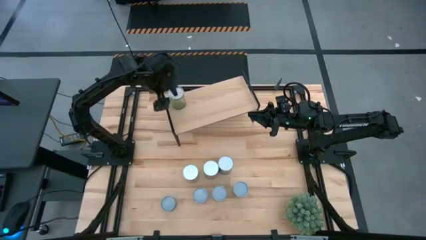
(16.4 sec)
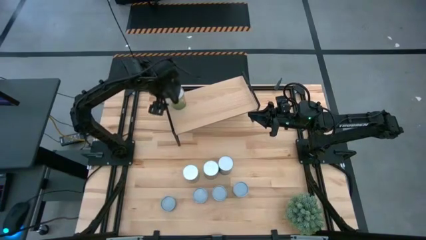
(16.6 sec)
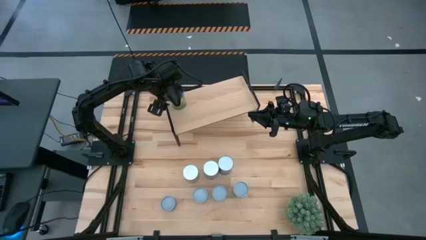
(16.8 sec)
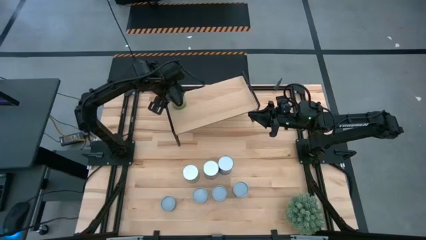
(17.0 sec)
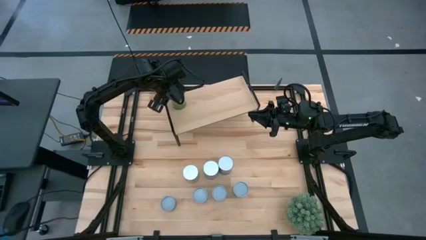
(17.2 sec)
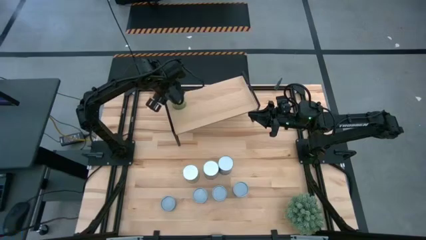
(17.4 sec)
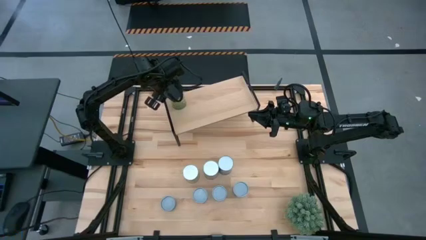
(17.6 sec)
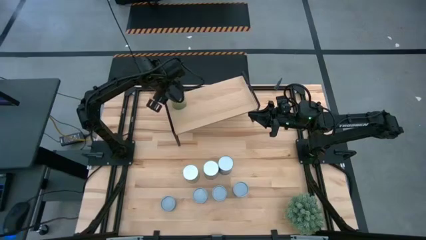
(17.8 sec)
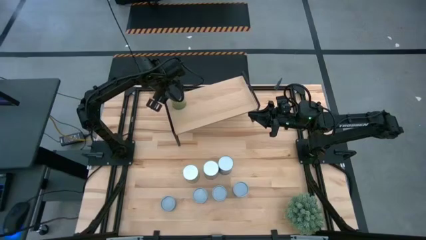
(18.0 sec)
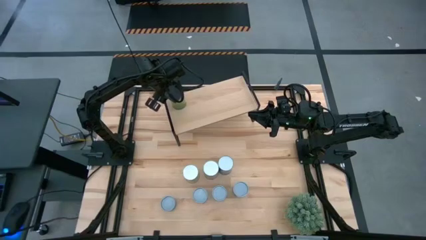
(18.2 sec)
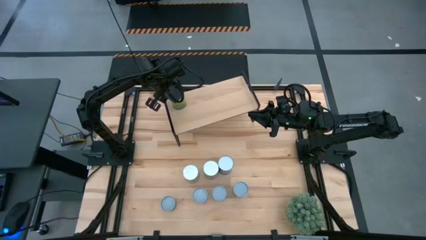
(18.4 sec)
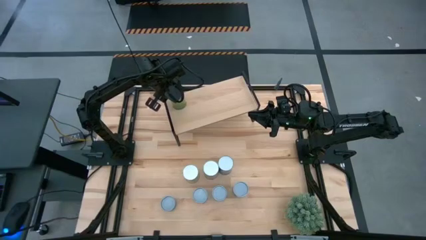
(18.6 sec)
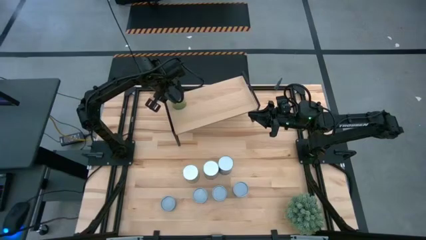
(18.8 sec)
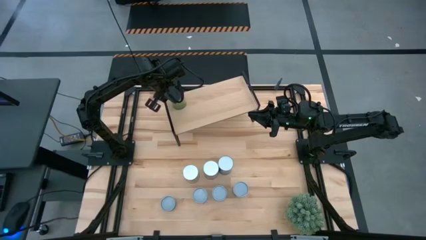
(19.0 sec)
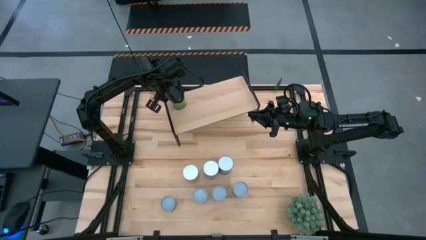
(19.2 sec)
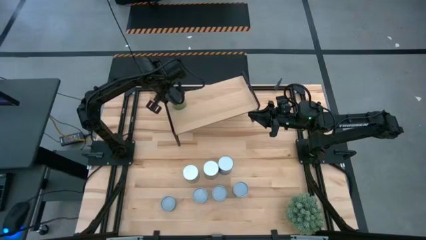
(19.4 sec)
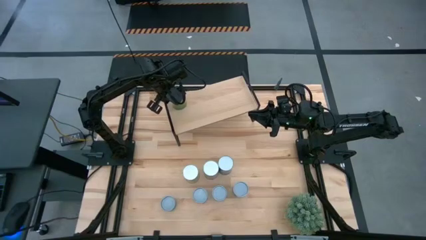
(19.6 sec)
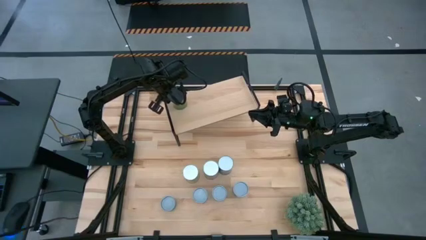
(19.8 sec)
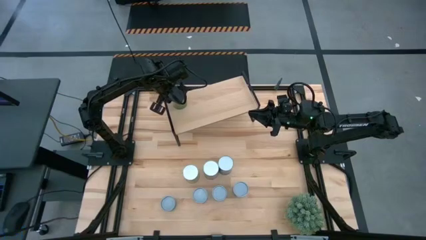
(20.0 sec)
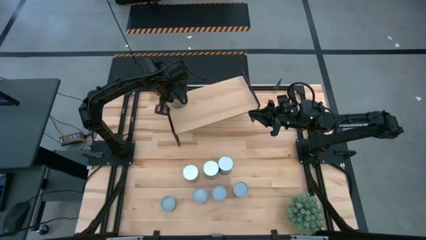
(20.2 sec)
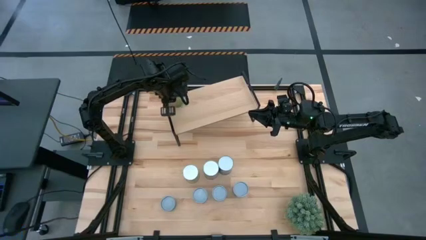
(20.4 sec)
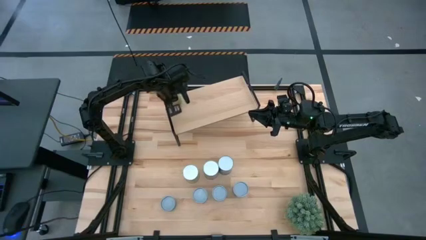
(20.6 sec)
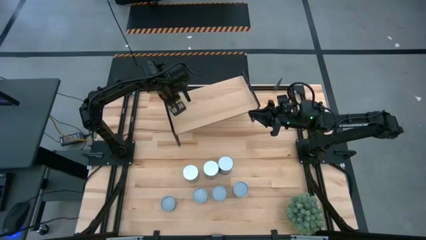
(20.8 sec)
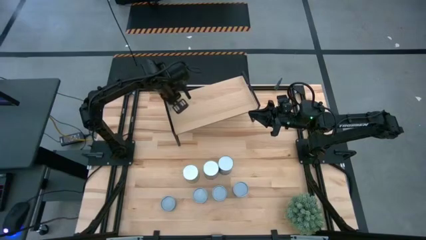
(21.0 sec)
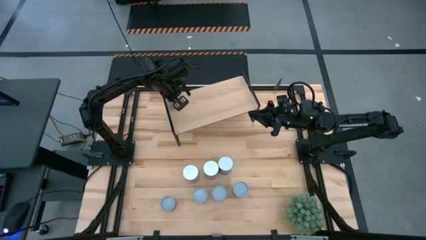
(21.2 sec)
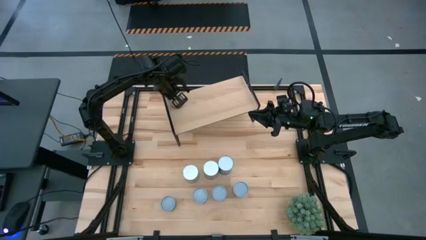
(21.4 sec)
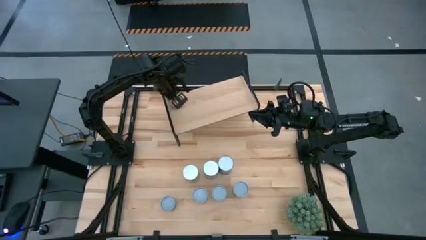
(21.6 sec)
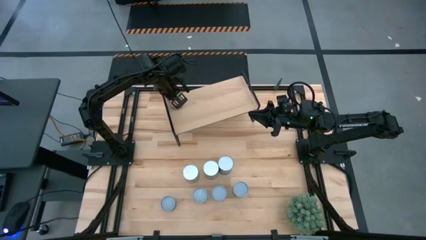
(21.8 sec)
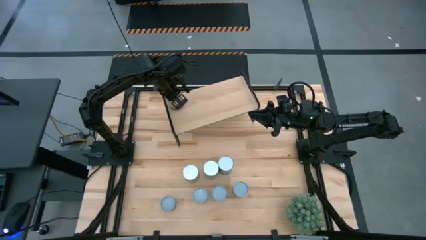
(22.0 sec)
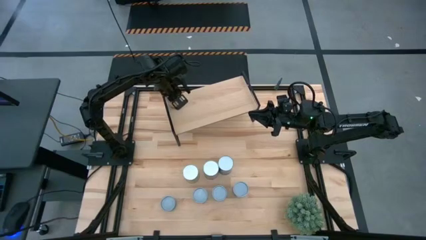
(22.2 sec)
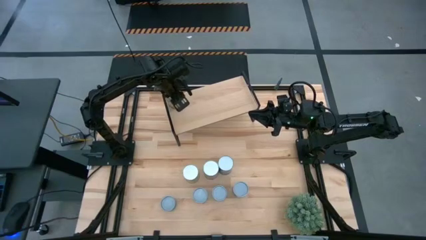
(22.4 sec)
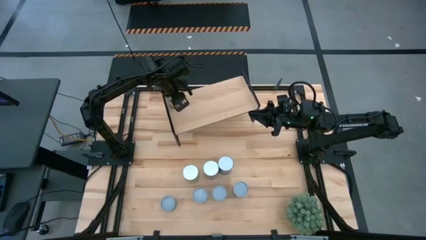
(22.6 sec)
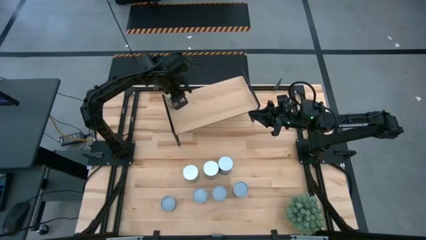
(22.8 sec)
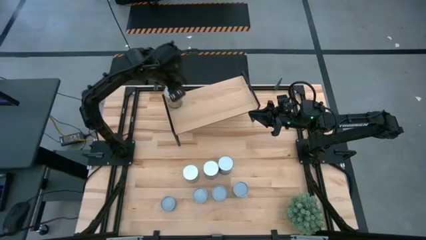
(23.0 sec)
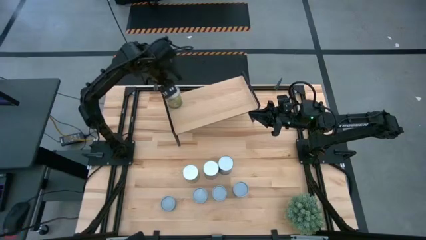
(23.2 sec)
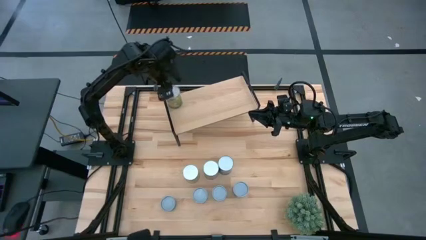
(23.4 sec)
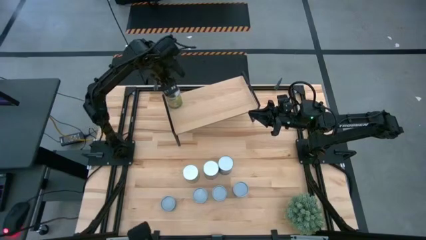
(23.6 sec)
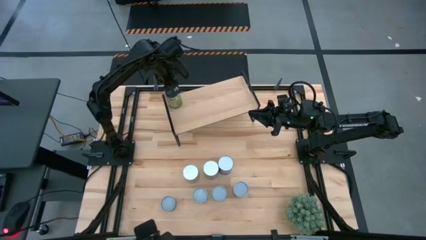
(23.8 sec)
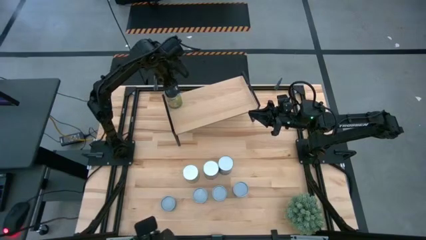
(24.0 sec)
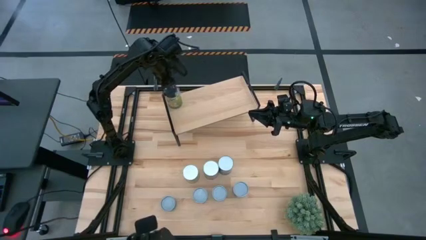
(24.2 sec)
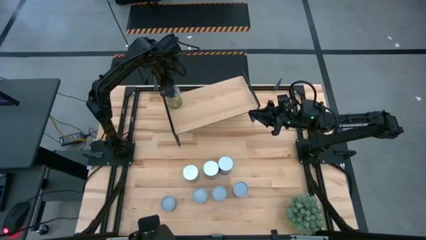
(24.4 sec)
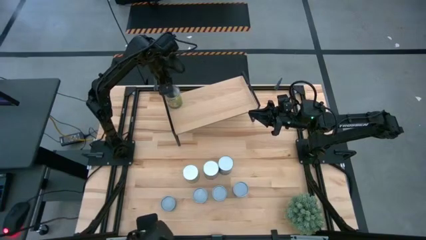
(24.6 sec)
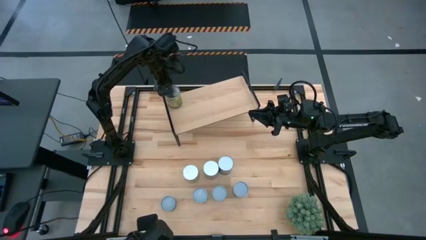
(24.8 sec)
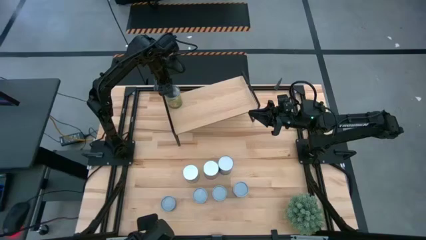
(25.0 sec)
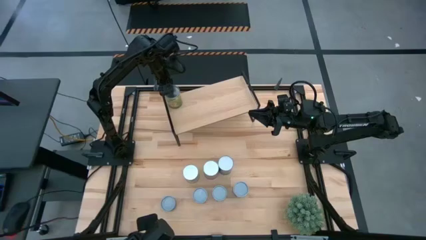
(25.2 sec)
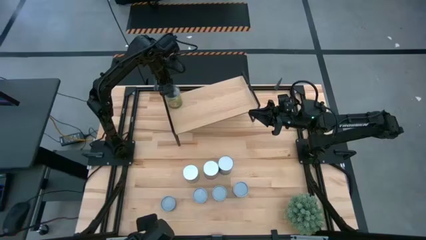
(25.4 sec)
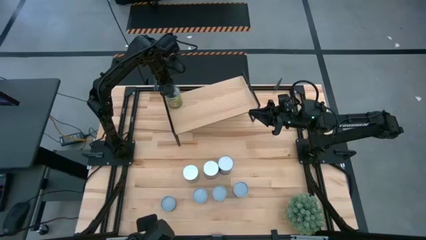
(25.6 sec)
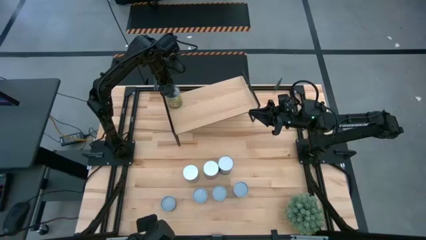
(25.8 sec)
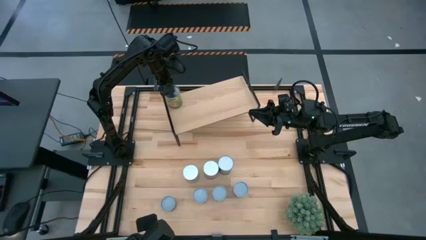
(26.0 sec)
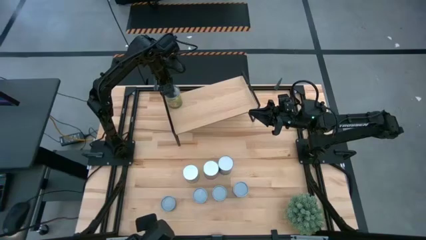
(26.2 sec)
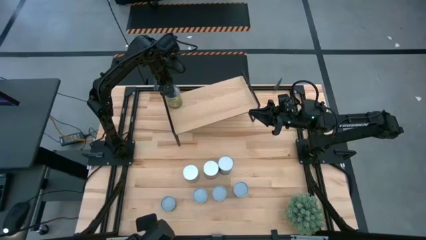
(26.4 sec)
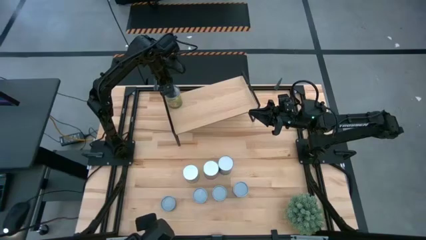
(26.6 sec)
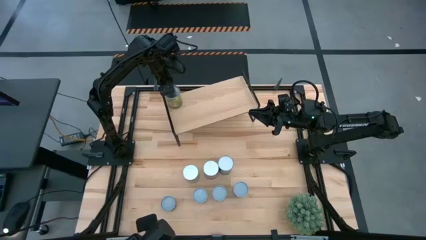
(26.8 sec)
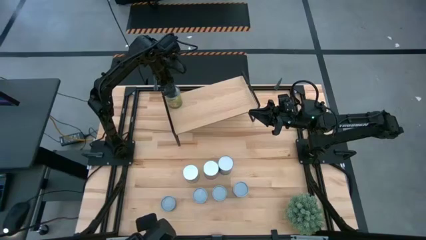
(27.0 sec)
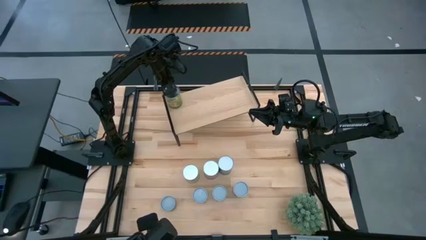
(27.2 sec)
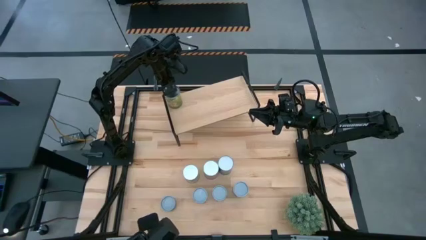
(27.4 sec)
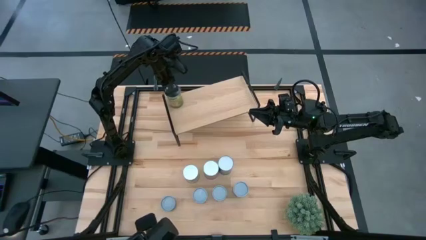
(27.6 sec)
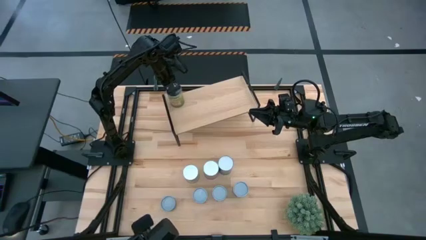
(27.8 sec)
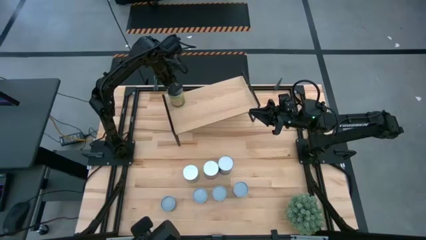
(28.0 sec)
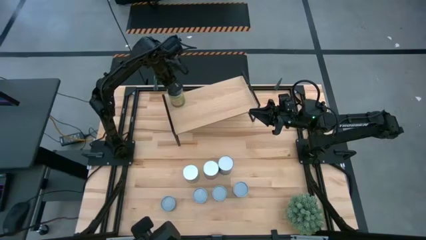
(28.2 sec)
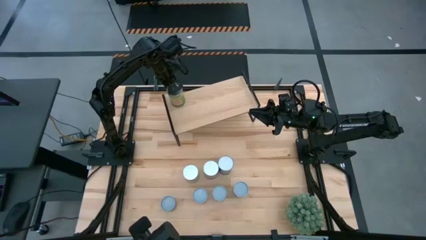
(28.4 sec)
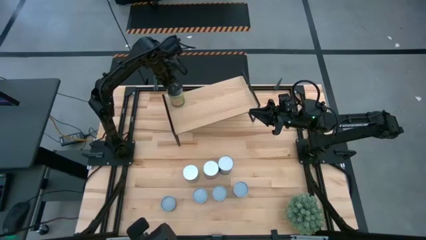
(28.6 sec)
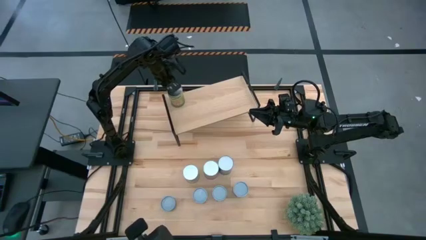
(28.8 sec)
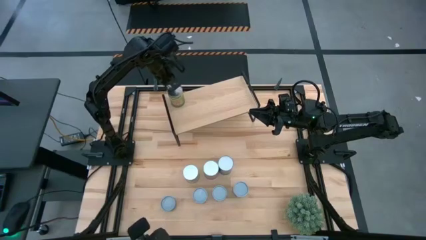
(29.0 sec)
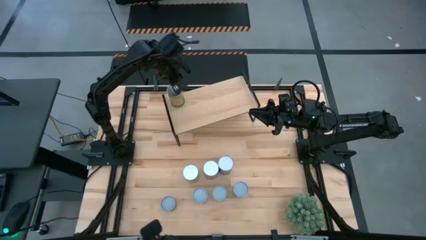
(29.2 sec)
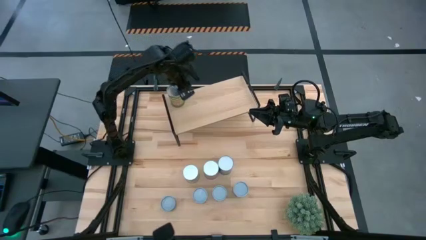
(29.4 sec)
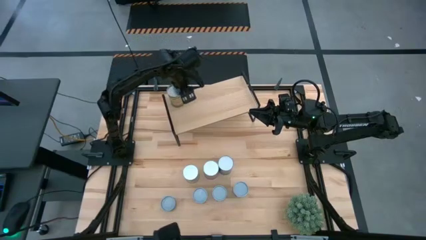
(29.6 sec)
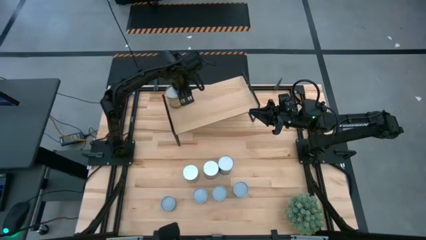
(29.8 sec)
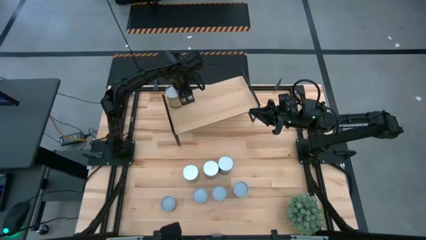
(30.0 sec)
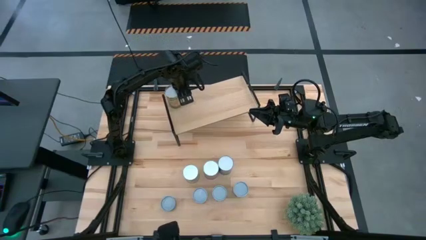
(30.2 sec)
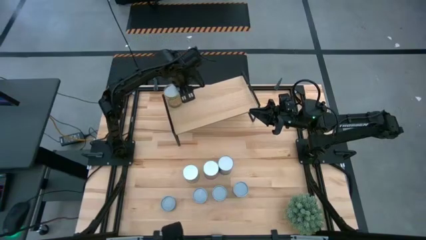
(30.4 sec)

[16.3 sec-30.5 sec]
Task: Pick and place cans onto a shelf
Put the canned oranges on the shelf
